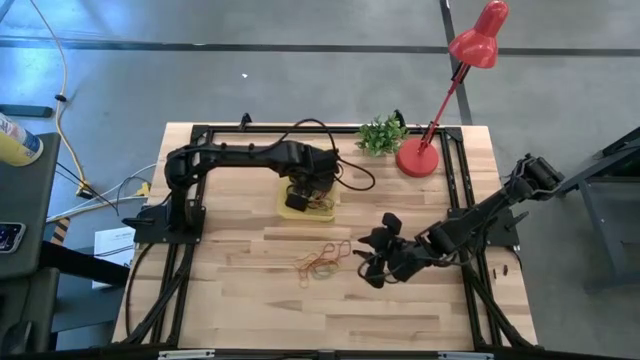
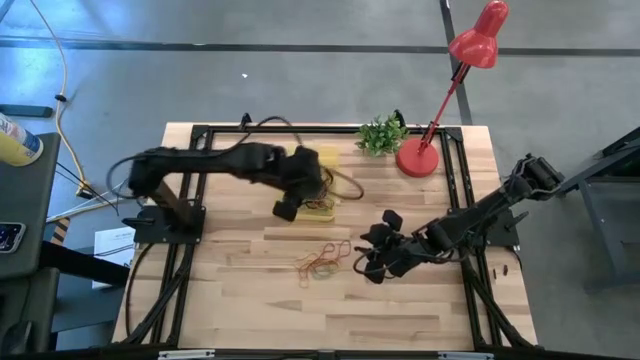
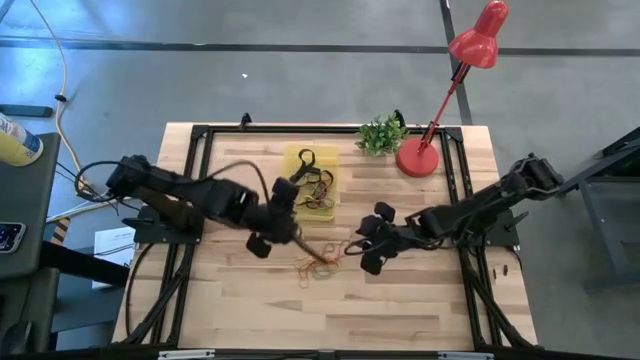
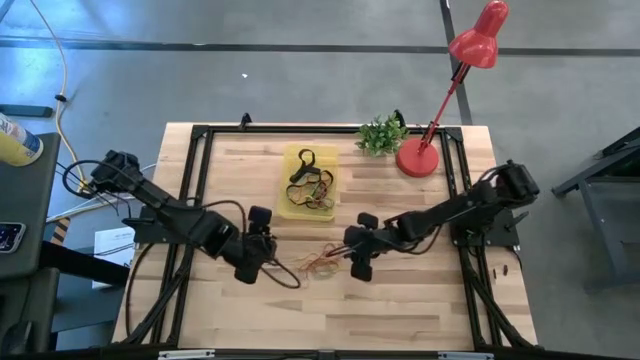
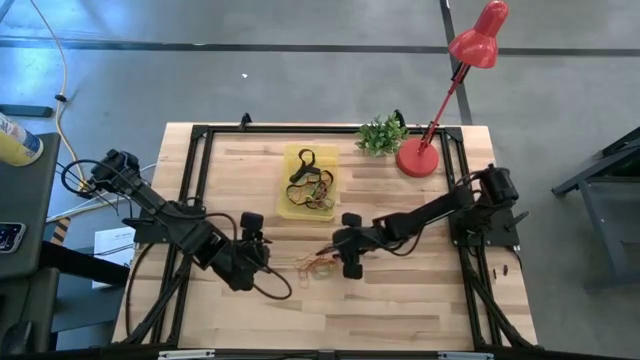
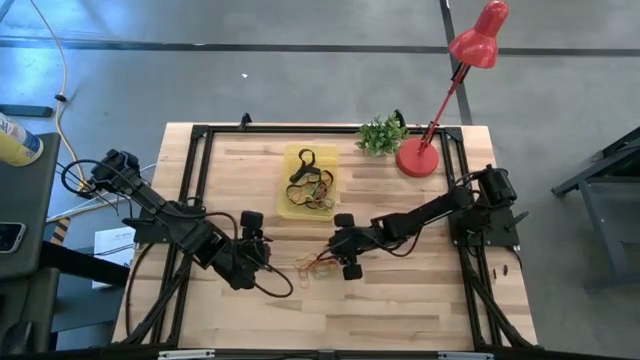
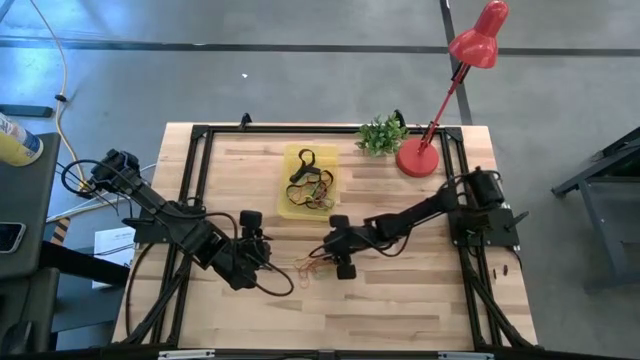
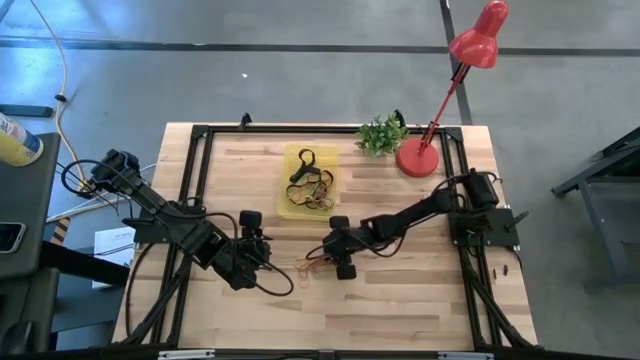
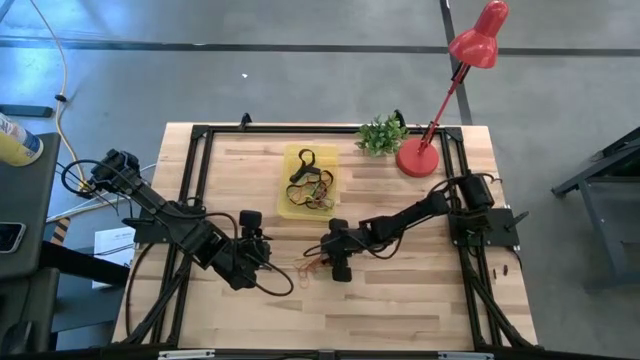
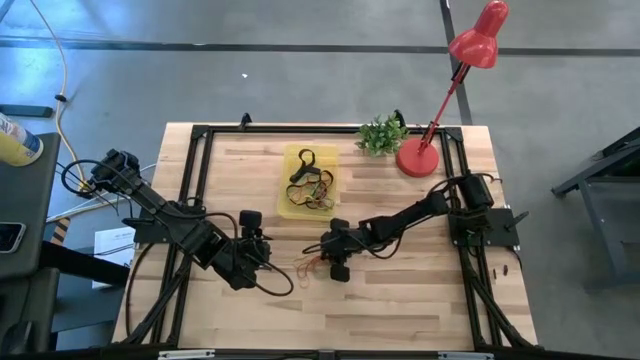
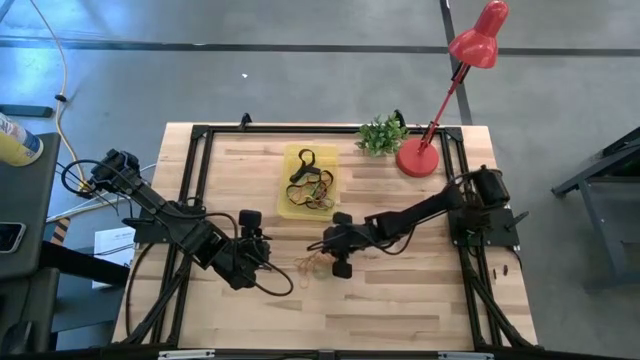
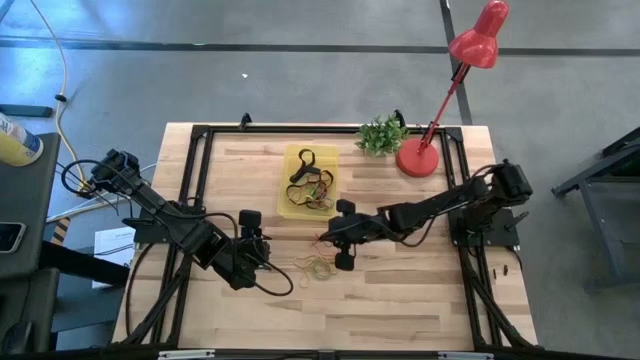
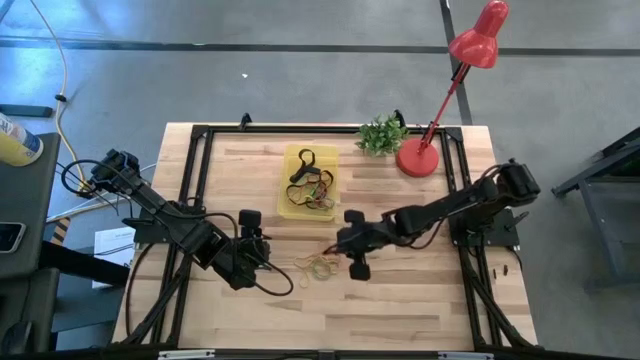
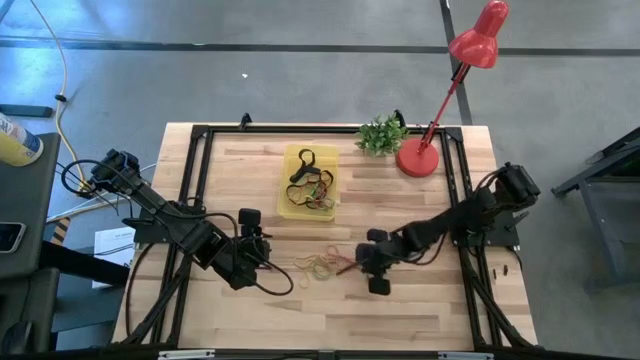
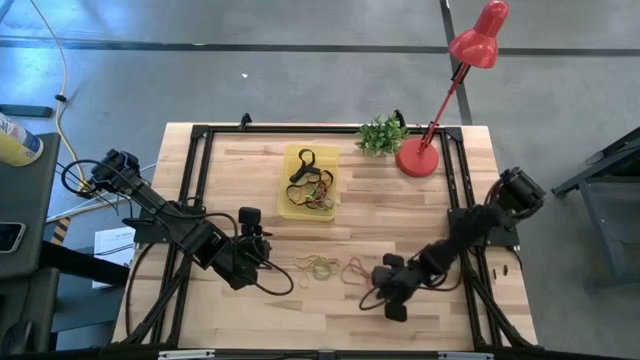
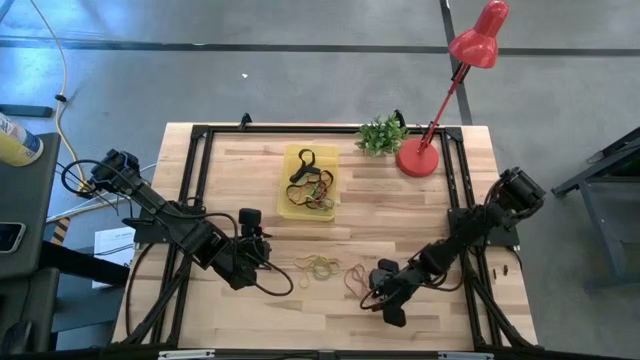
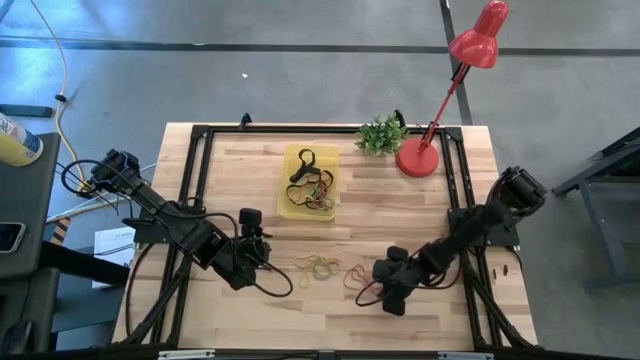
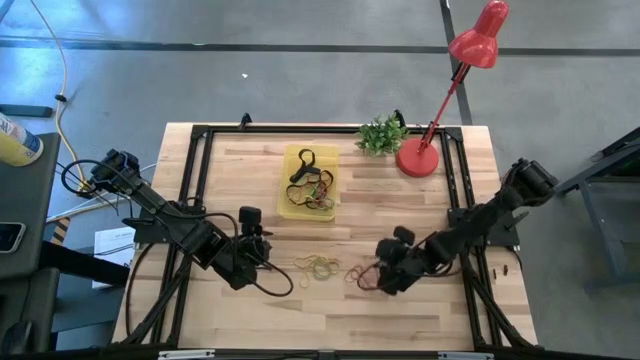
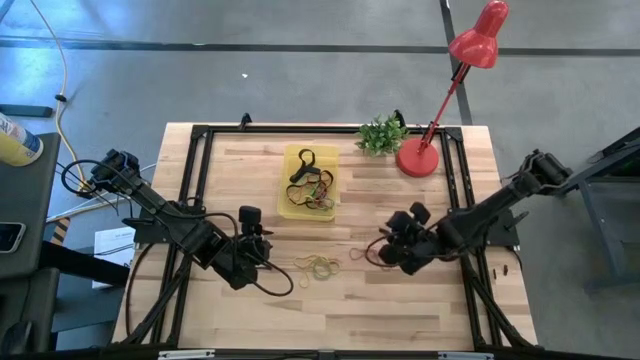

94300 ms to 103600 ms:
Task: Pick and place rubber bands into bin
Put the red rubber band into the yellow bin

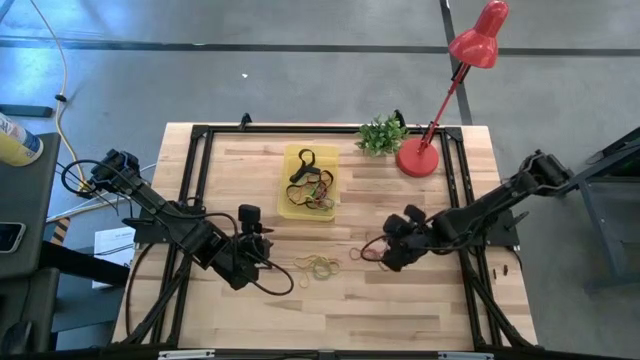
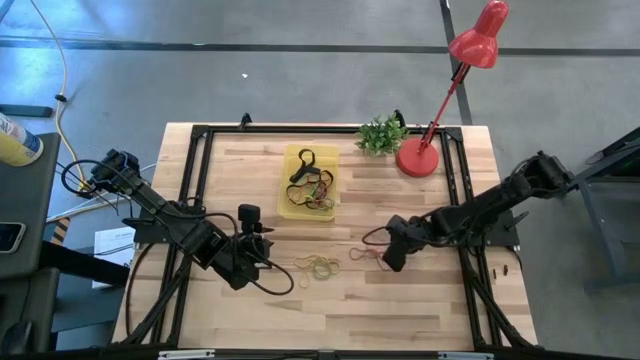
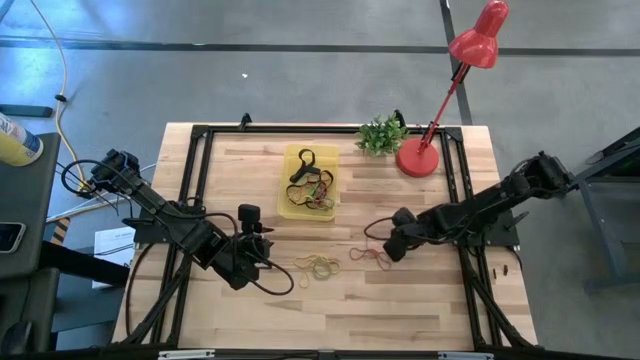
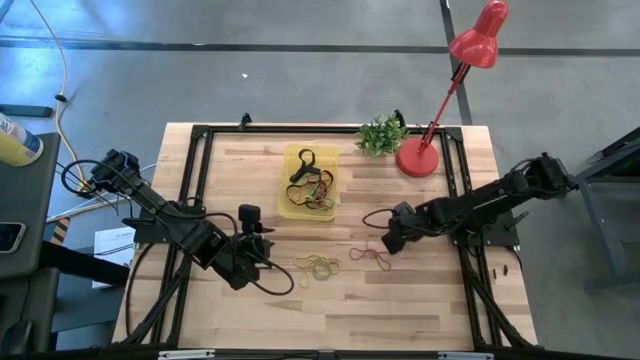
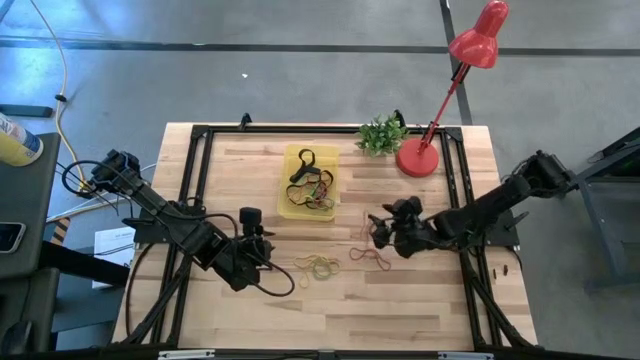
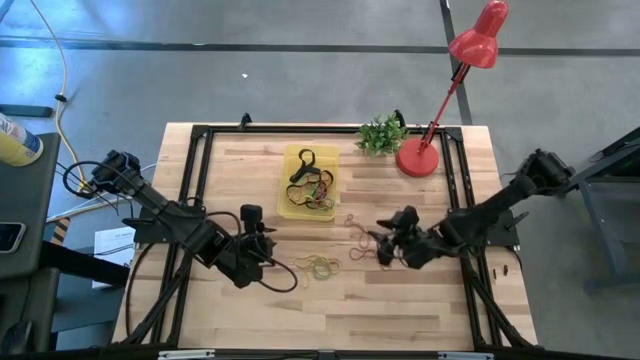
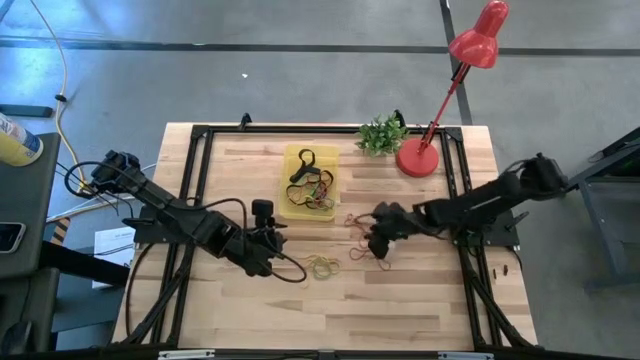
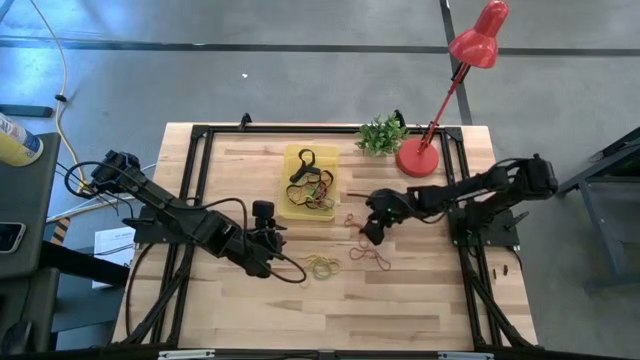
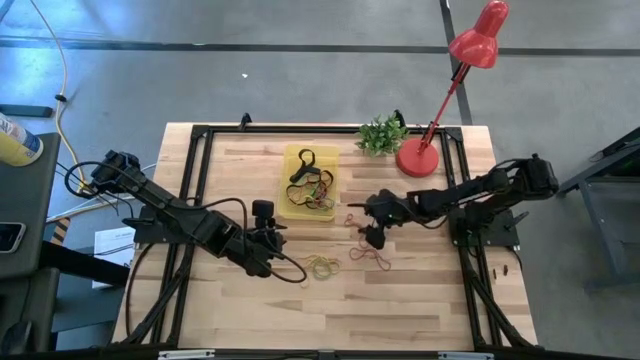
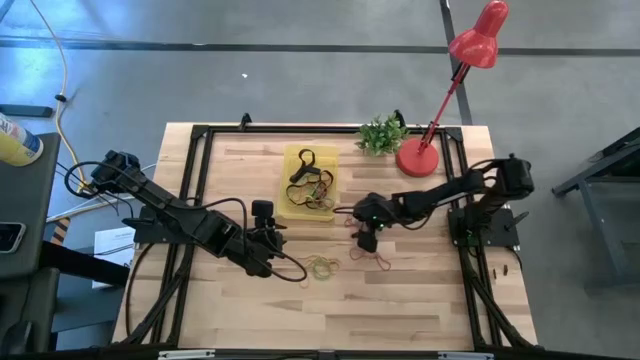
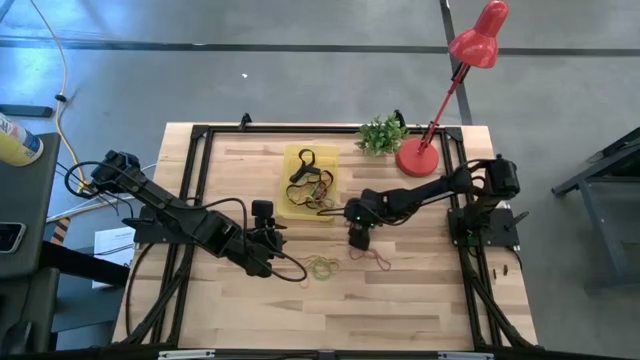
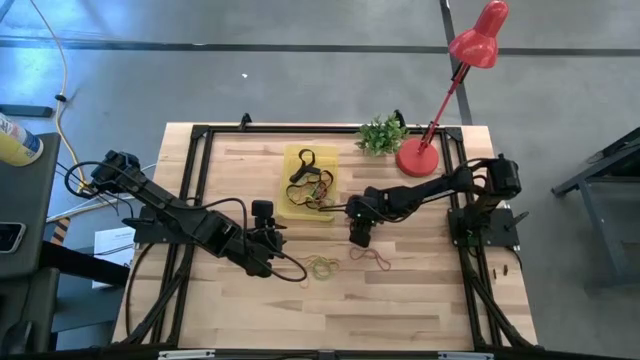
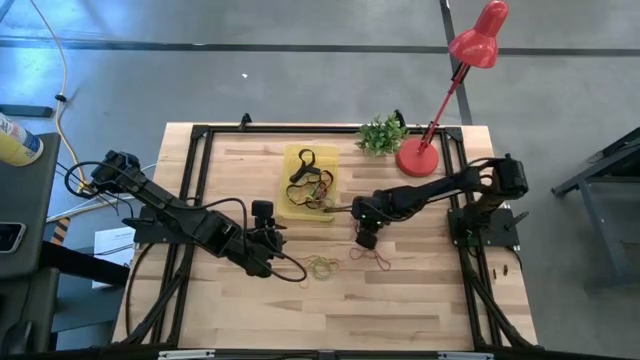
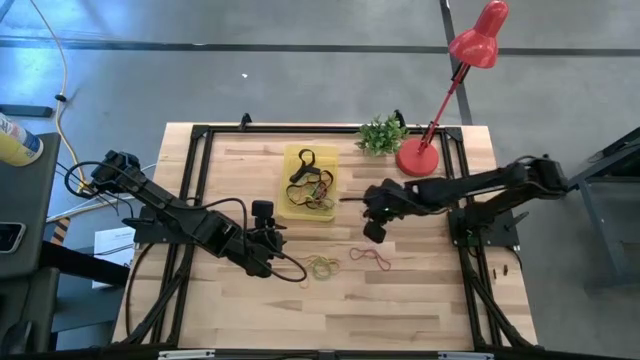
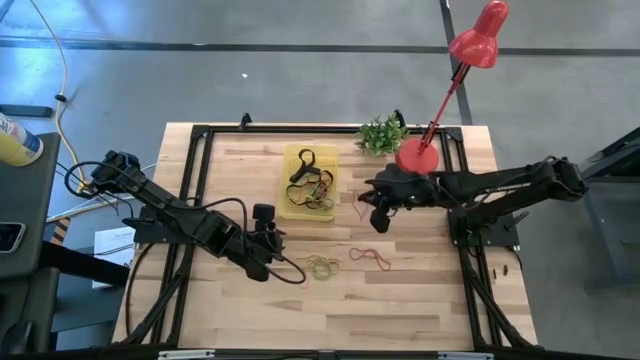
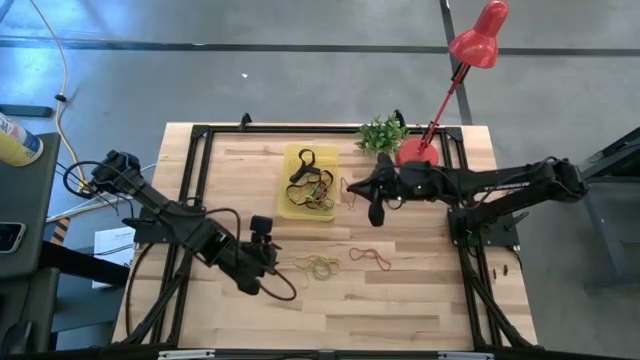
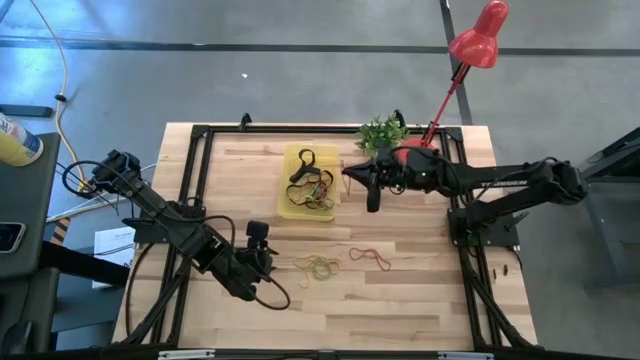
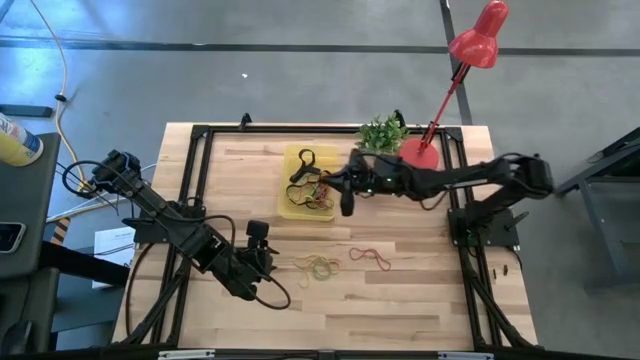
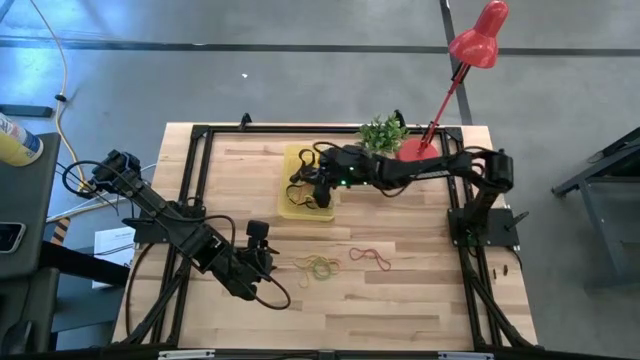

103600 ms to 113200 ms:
Put the red rubber band into the yellow bin
